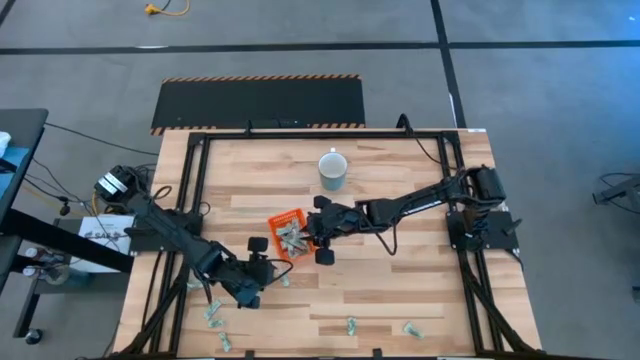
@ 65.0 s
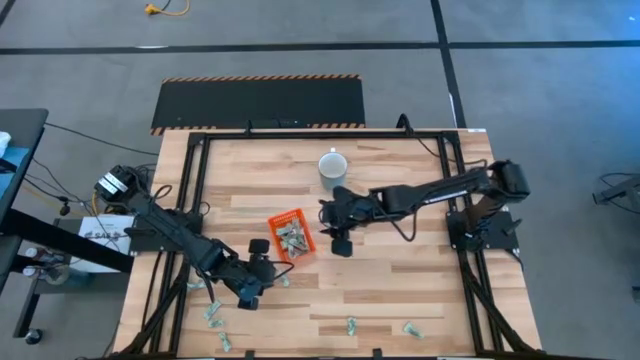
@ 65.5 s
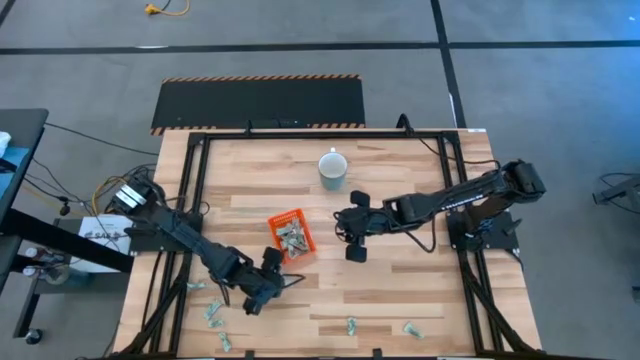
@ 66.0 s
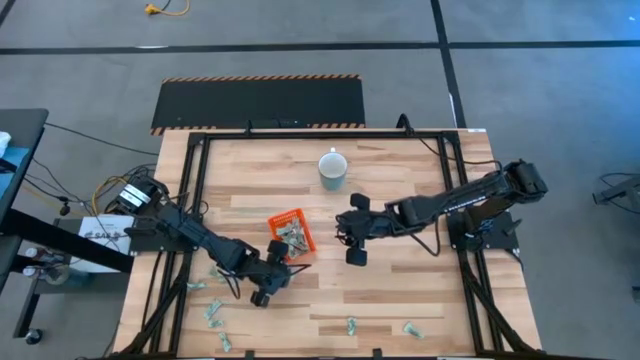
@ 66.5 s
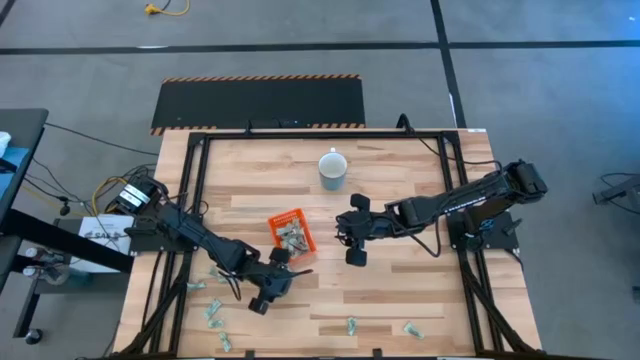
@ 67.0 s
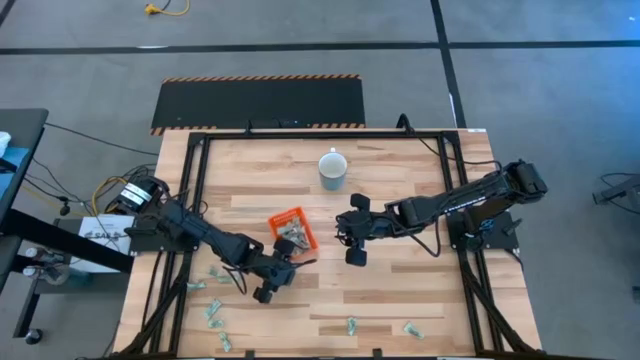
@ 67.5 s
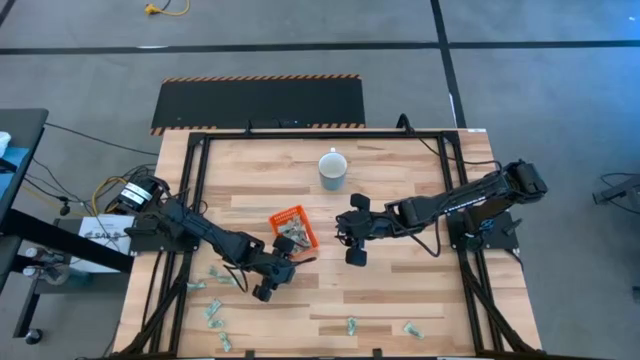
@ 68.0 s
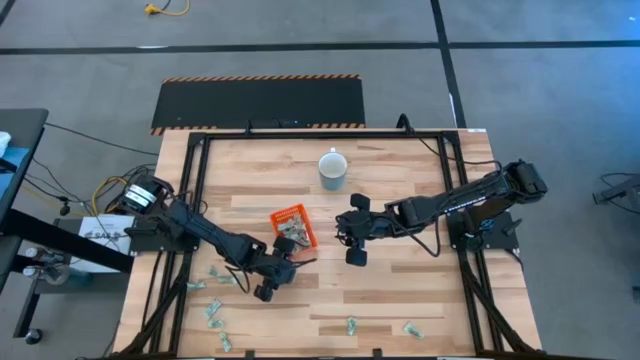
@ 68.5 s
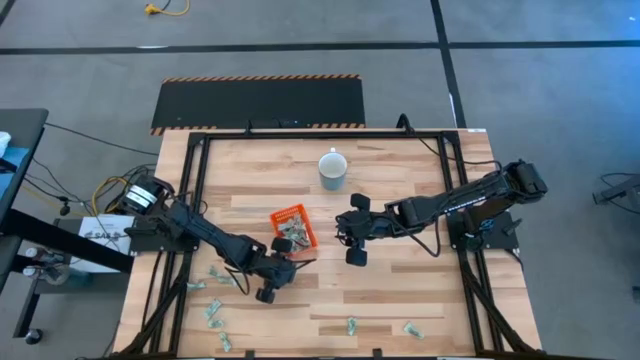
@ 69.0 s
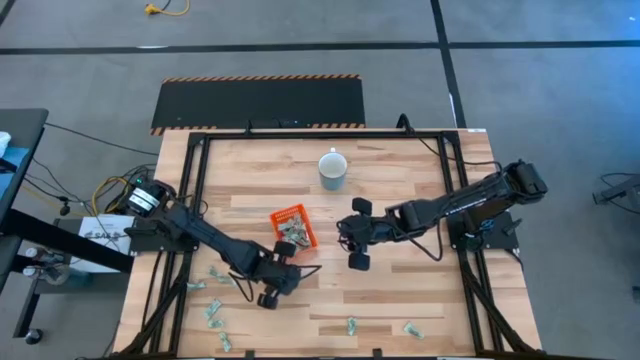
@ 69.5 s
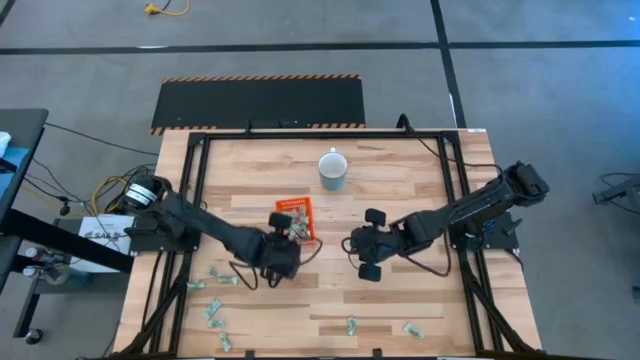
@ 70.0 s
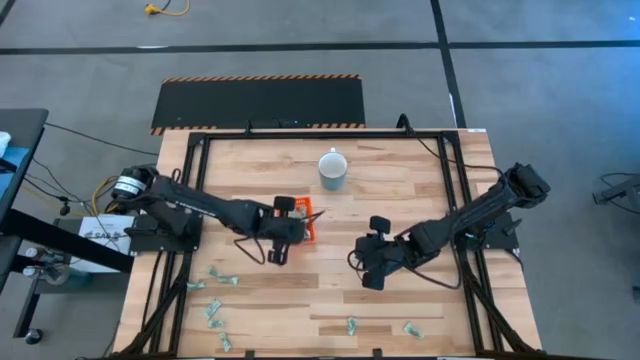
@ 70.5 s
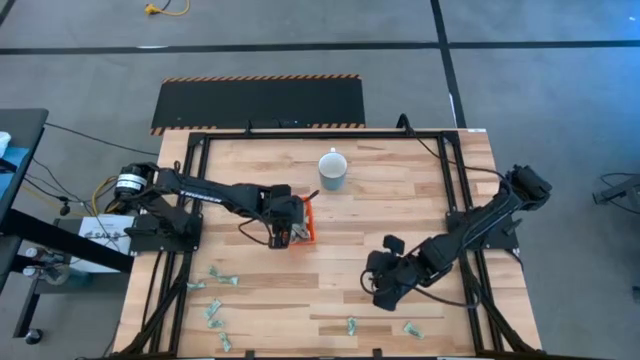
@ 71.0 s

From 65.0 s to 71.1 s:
Task: Pick and place items into bin
Put the green stevia packet into the orange bin

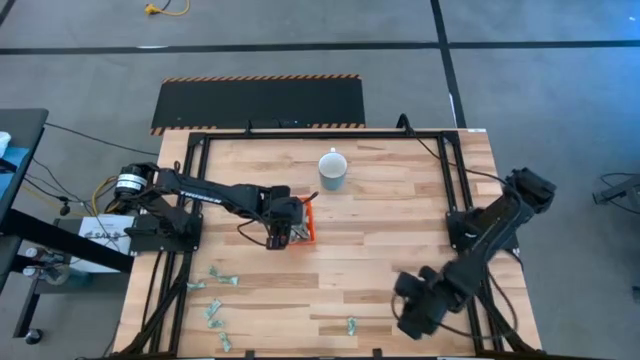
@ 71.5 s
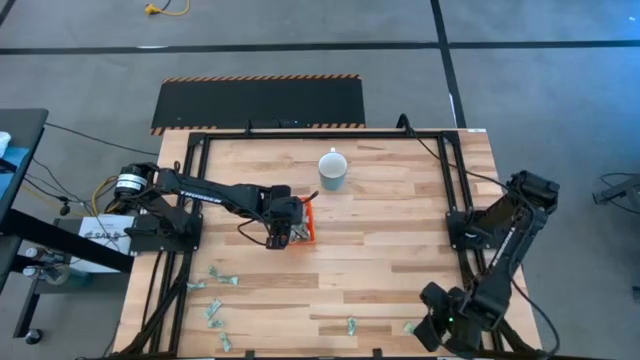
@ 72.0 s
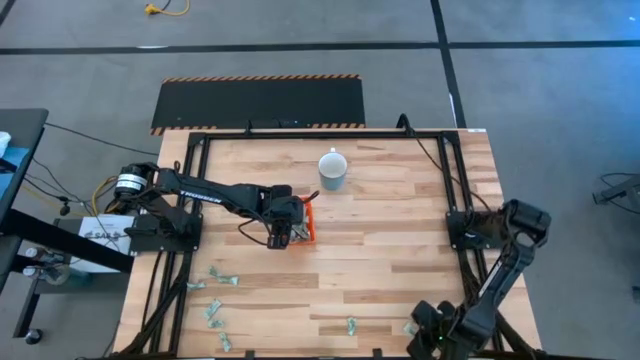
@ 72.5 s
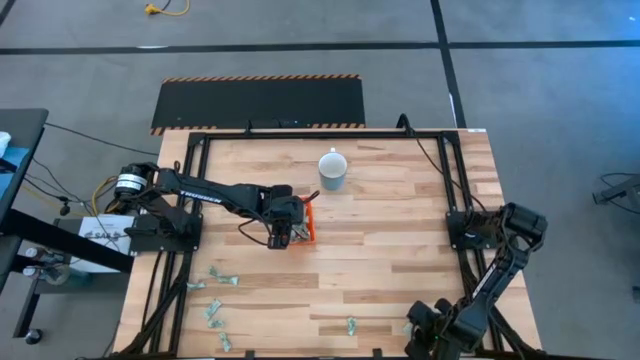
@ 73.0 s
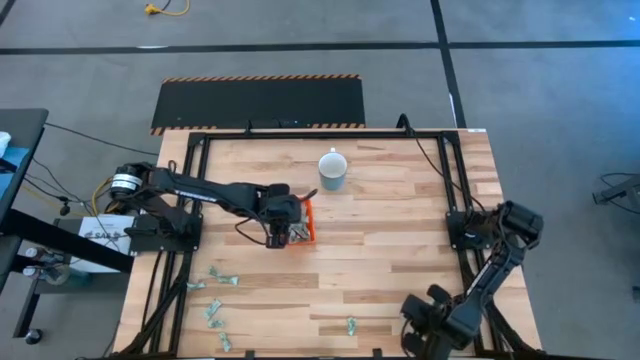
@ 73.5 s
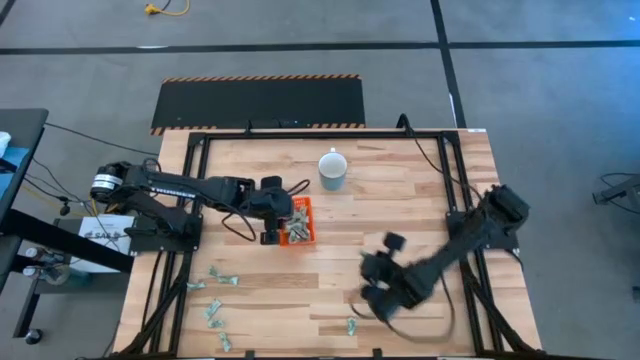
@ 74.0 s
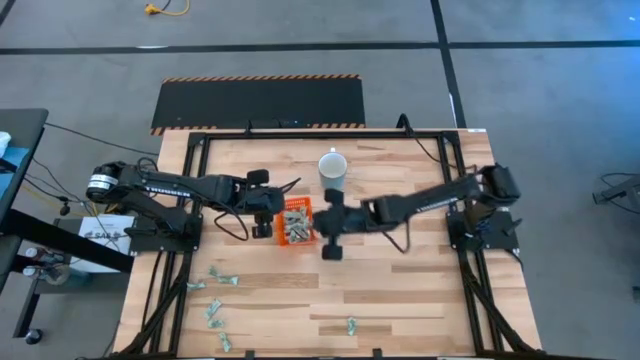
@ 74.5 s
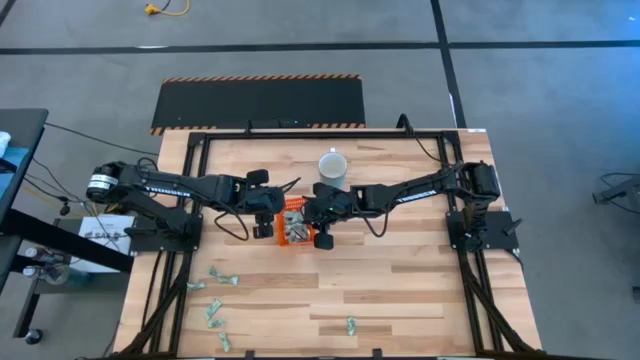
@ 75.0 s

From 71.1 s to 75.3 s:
Put the green stevia packet into the orange bin

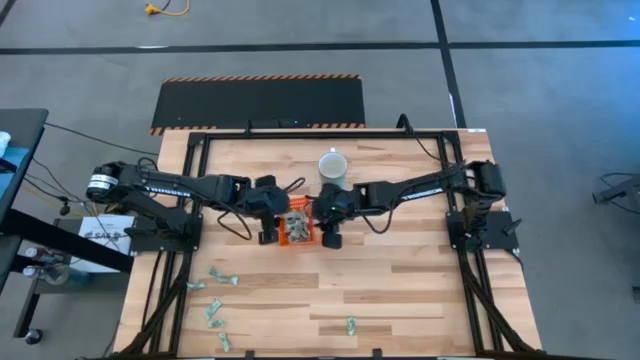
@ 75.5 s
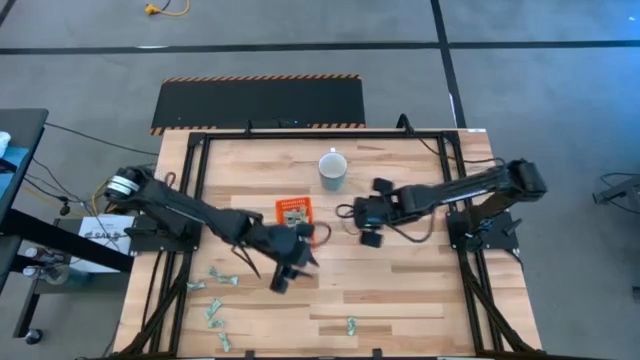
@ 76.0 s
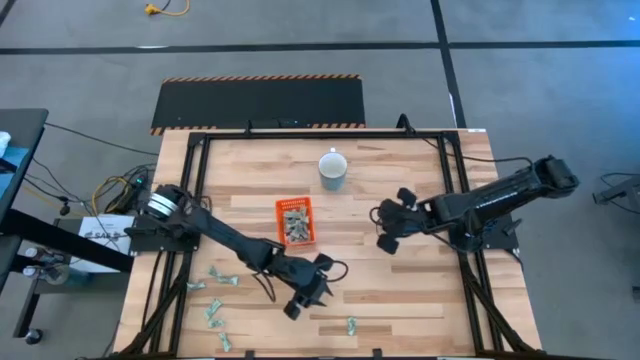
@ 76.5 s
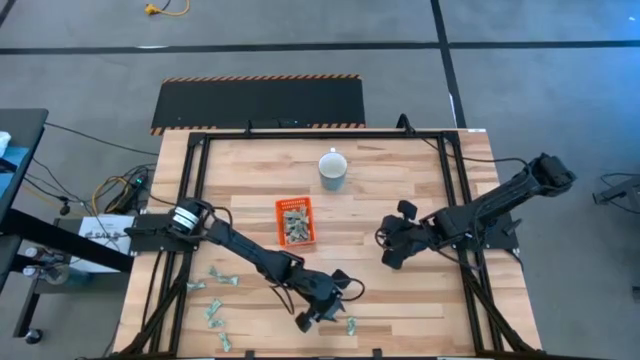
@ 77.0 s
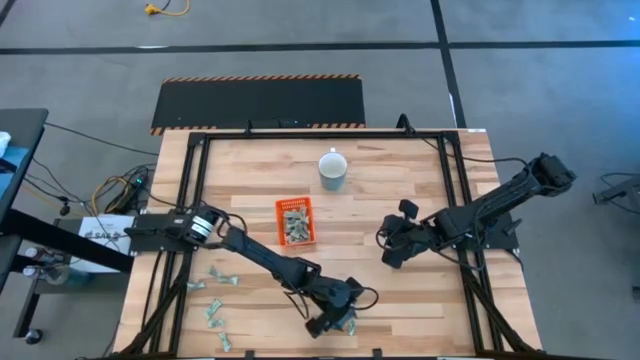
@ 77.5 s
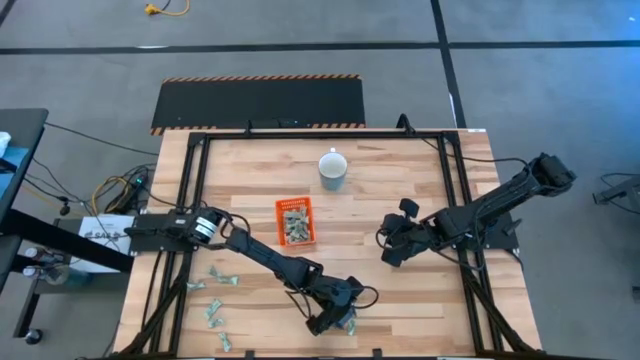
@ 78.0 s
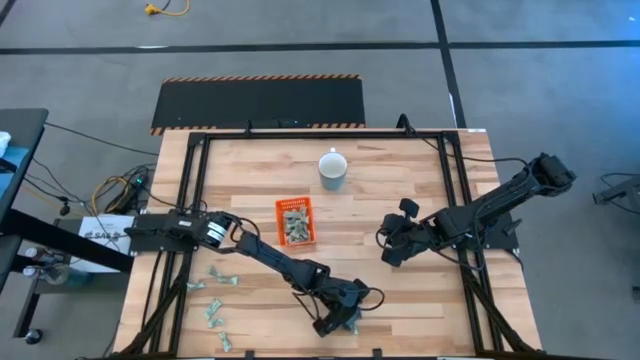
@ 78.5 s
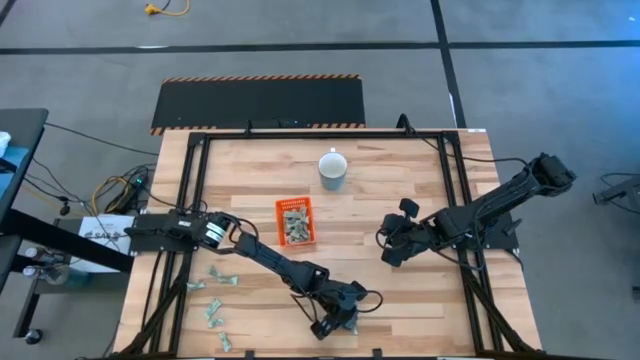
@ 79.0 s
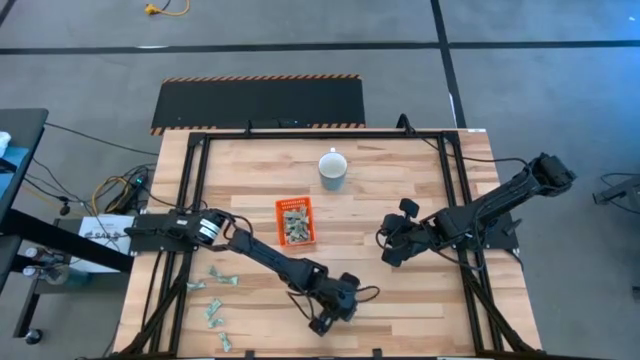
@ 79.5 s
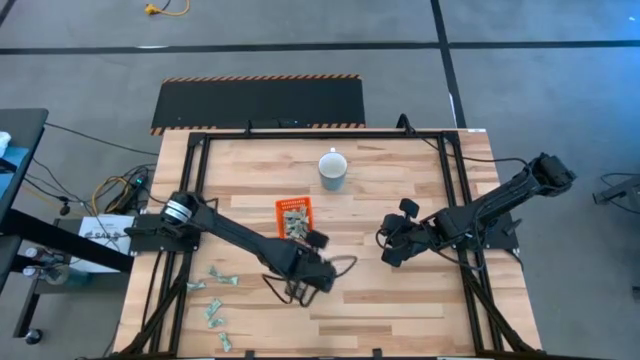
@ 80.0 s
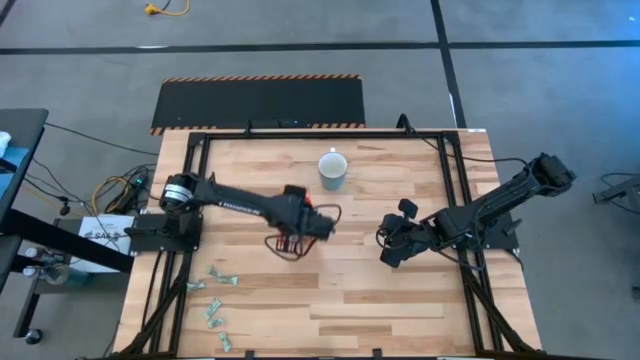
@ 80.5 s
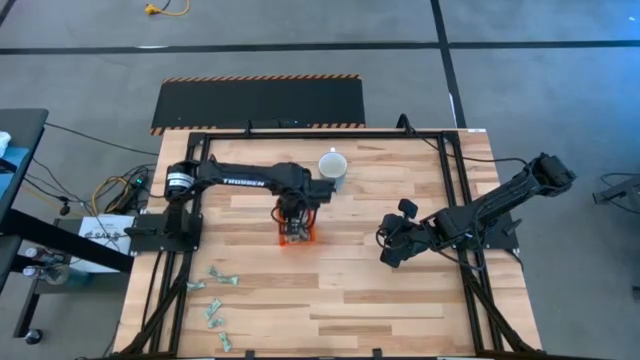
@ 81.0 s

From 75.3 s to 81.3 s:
Put the green stevia packet into the orange bin

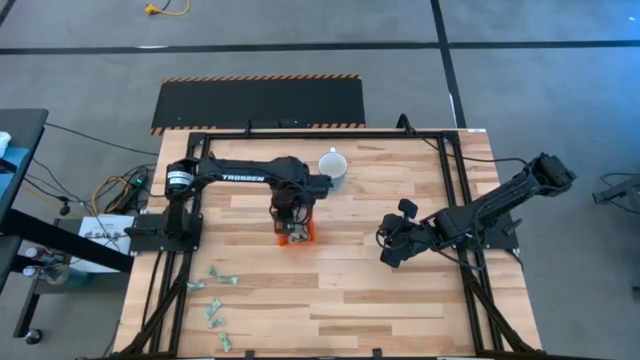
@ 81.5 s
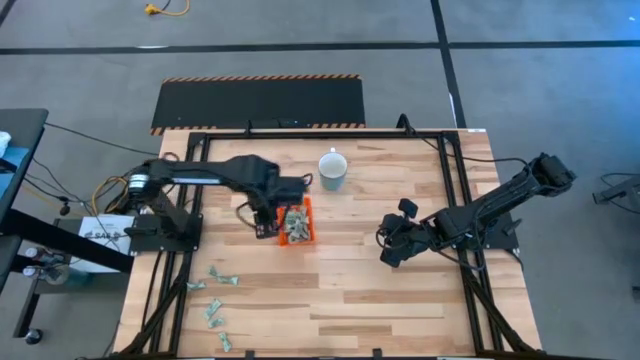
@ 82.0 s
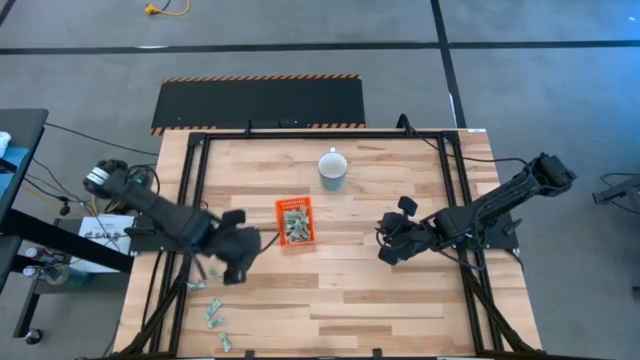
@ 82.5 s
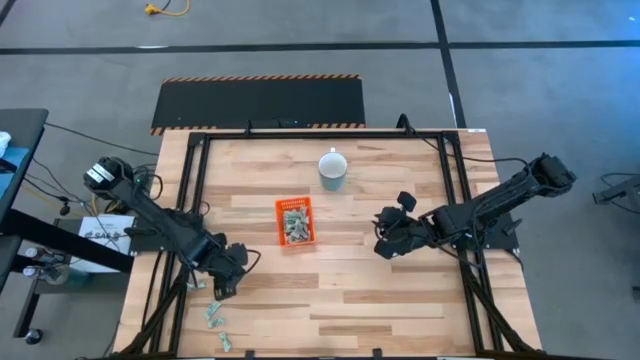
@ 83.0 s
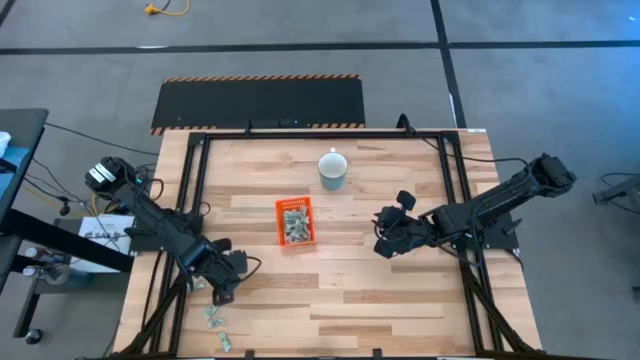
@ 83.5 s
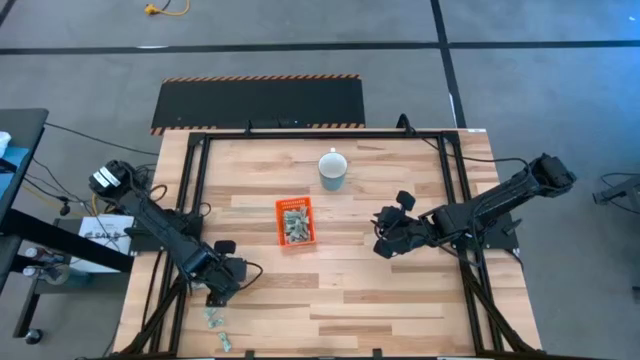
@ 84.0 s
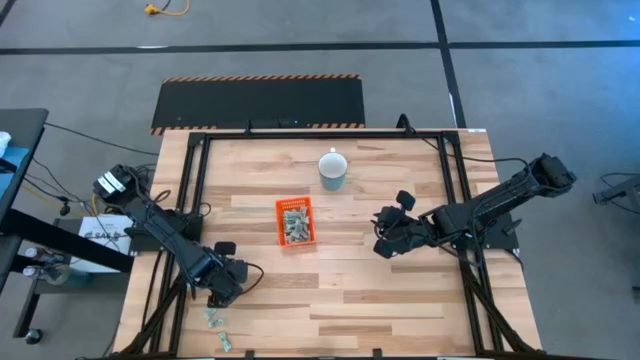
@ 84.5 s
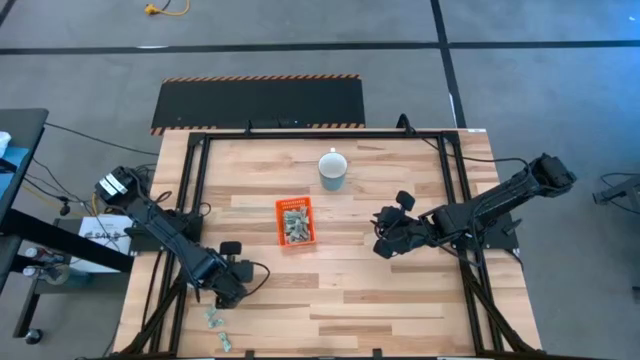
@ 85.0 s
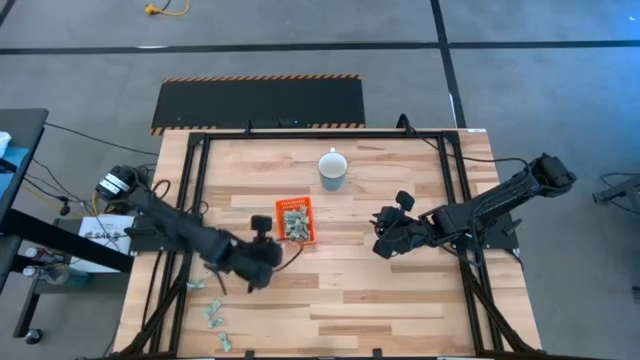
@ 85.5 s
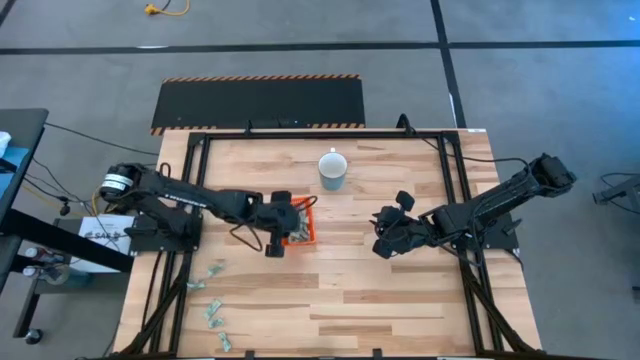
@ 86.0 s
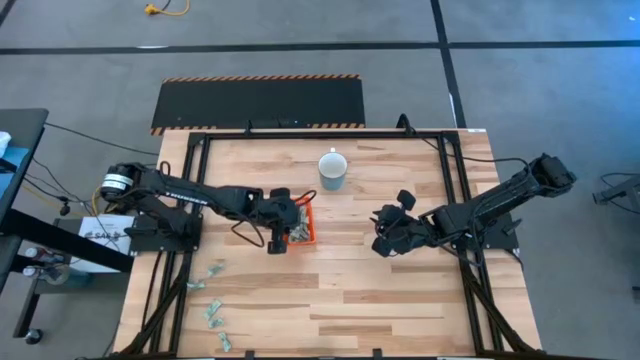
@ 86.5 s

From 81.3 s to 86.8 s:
Put the green stevia packet into the orange bin
